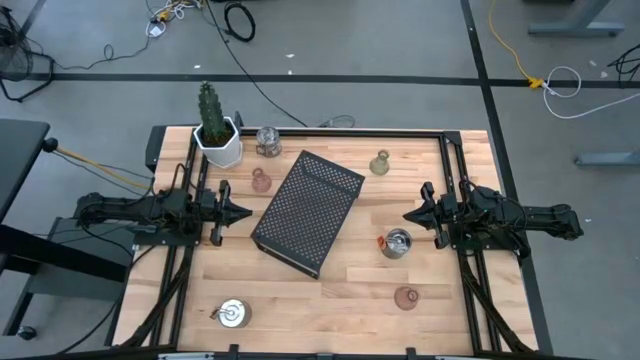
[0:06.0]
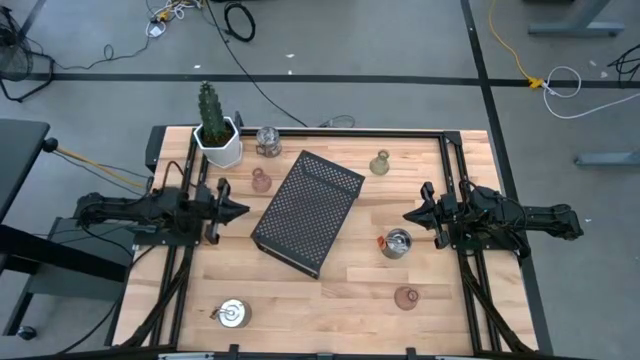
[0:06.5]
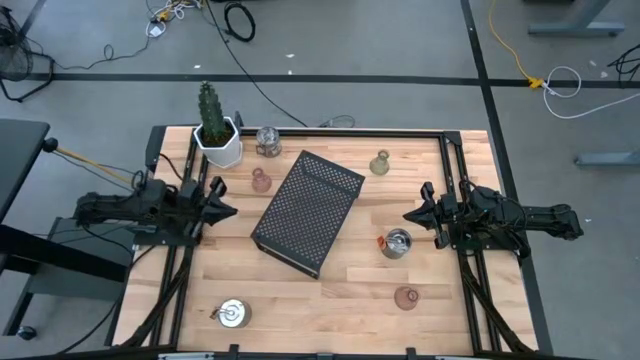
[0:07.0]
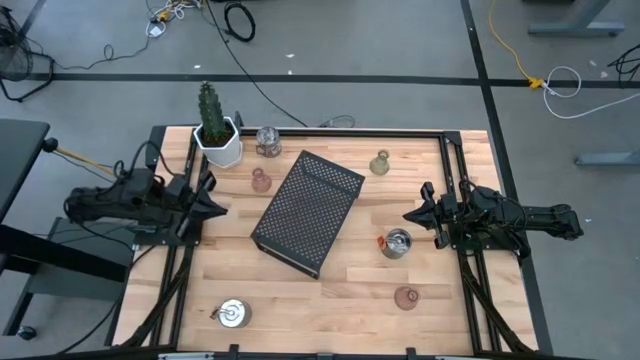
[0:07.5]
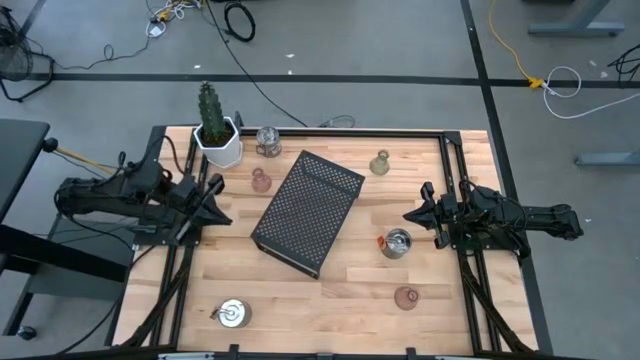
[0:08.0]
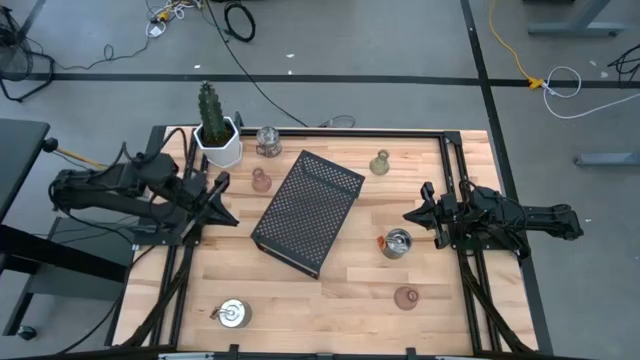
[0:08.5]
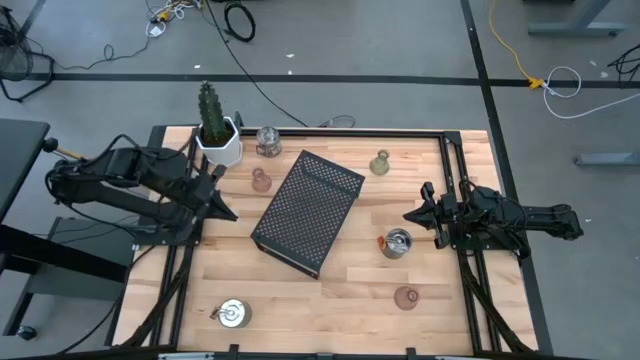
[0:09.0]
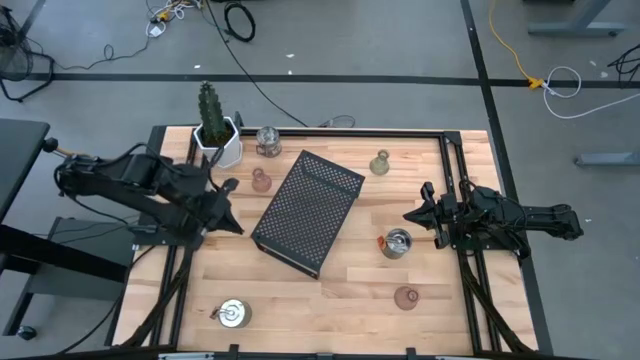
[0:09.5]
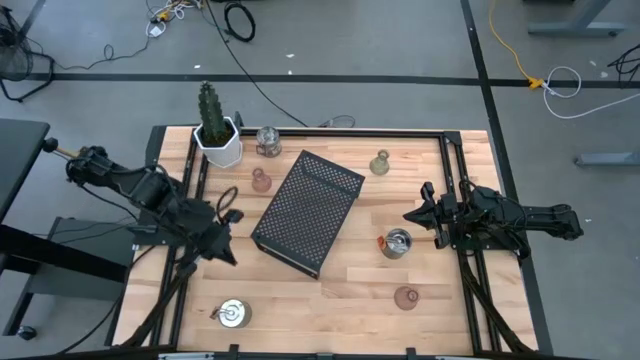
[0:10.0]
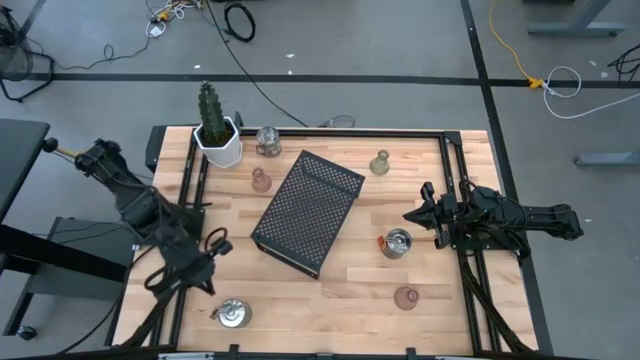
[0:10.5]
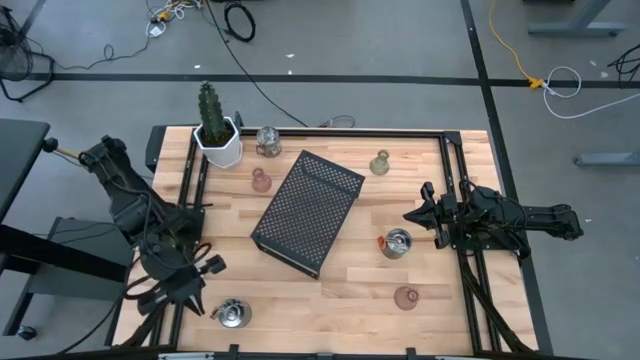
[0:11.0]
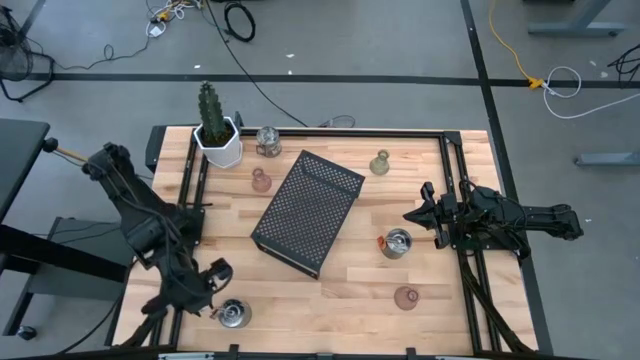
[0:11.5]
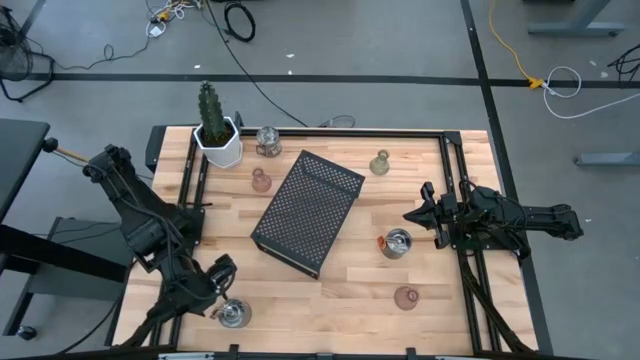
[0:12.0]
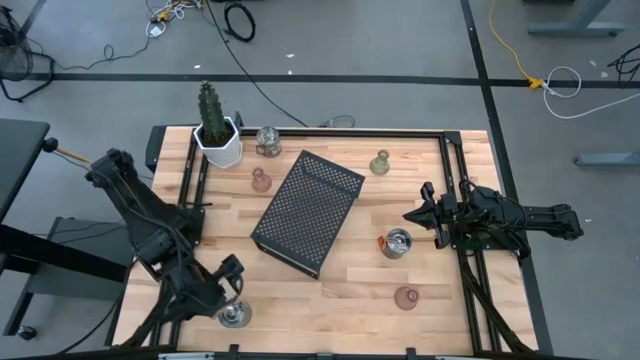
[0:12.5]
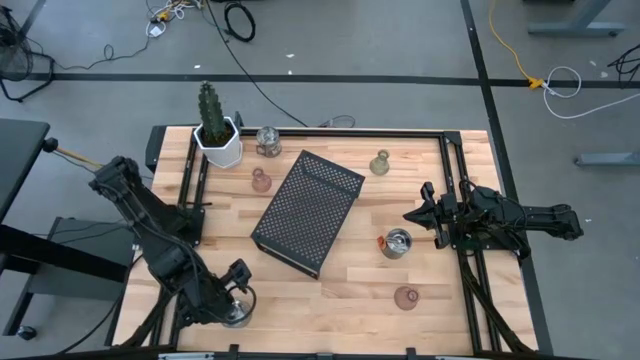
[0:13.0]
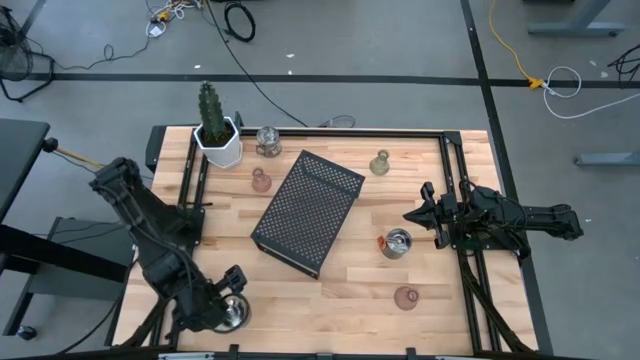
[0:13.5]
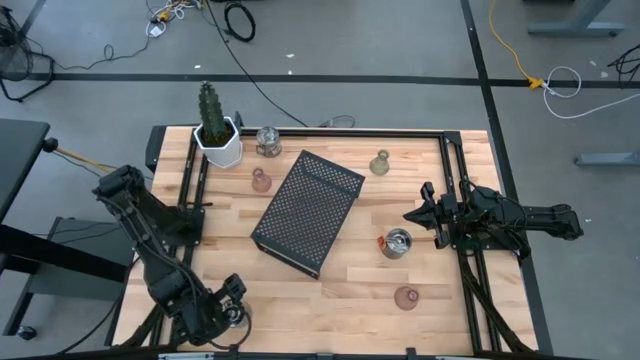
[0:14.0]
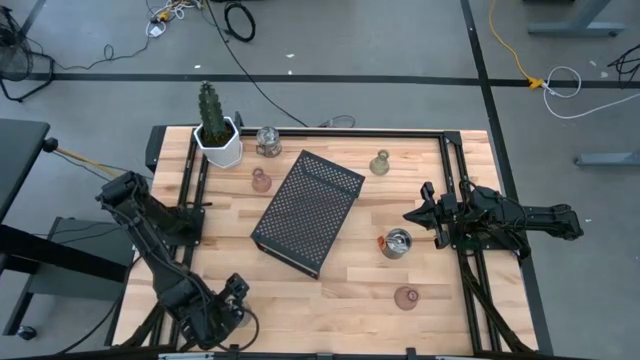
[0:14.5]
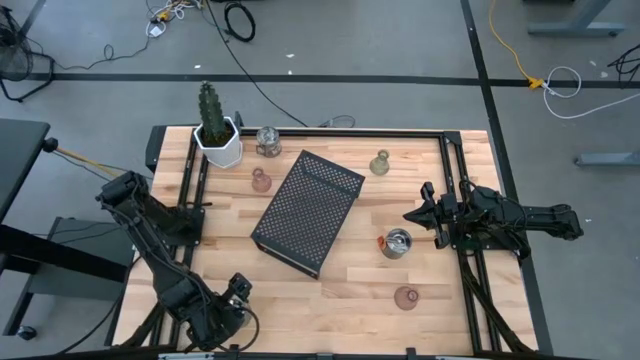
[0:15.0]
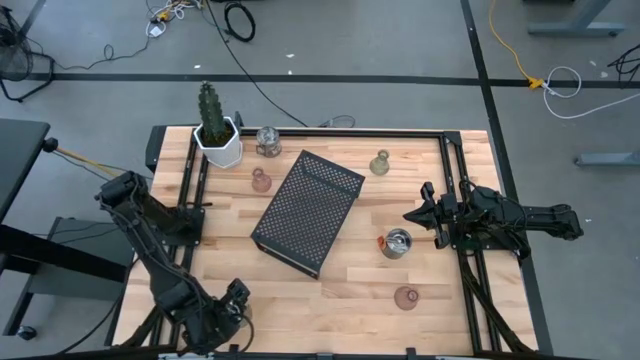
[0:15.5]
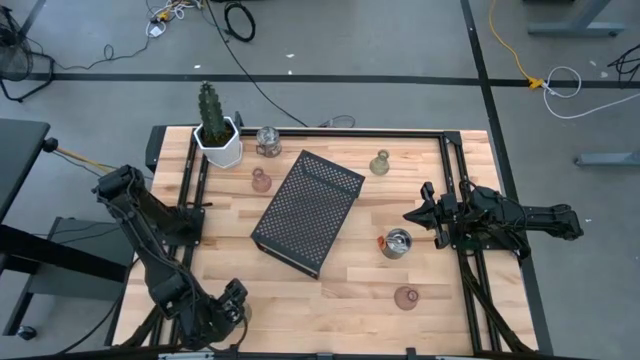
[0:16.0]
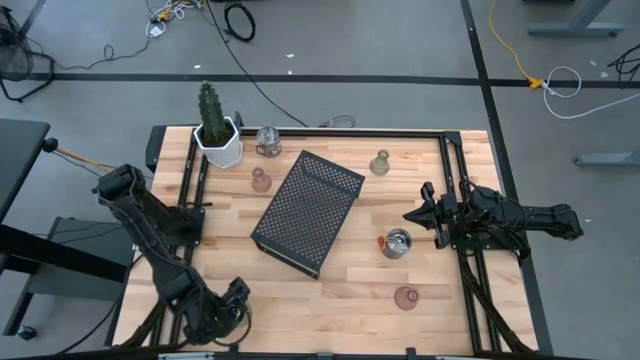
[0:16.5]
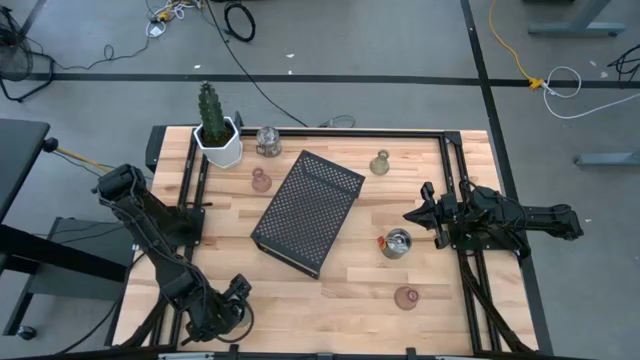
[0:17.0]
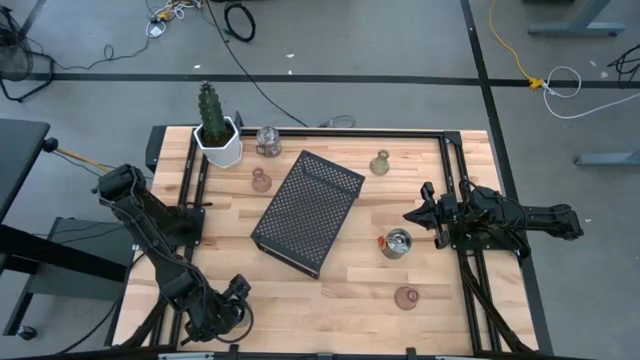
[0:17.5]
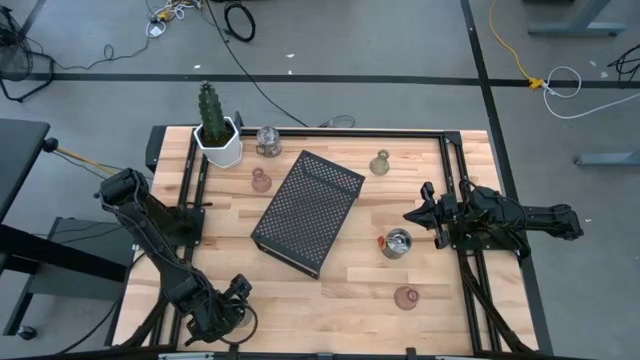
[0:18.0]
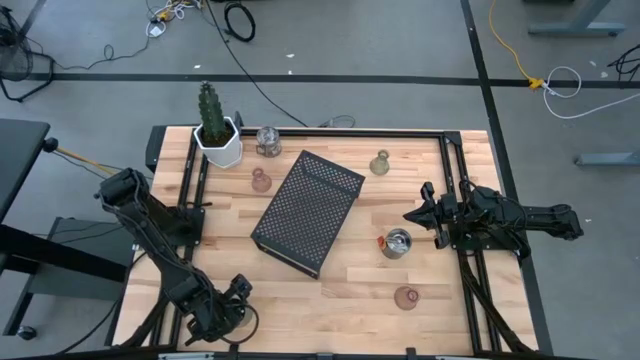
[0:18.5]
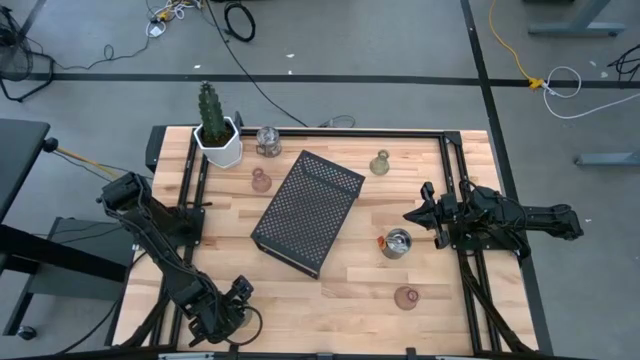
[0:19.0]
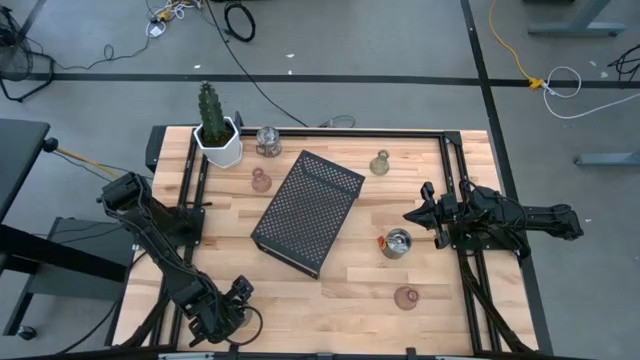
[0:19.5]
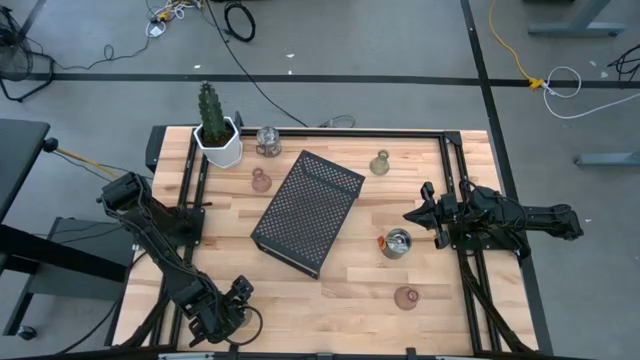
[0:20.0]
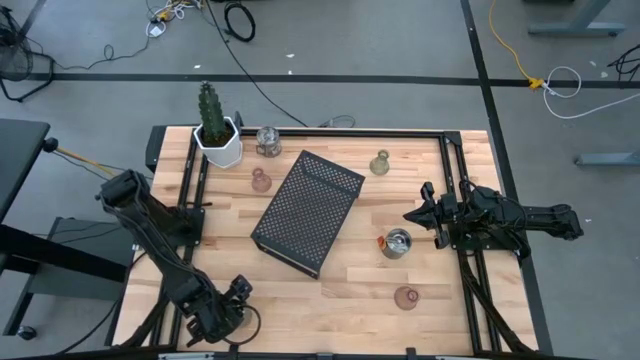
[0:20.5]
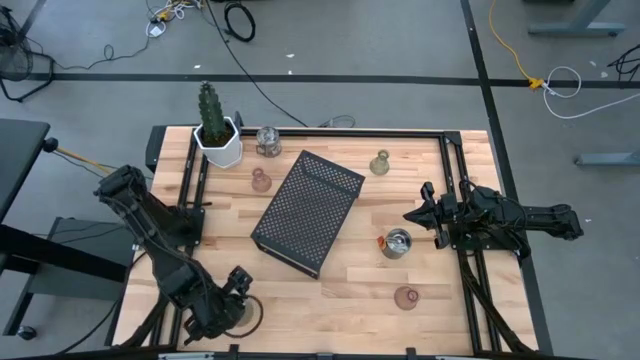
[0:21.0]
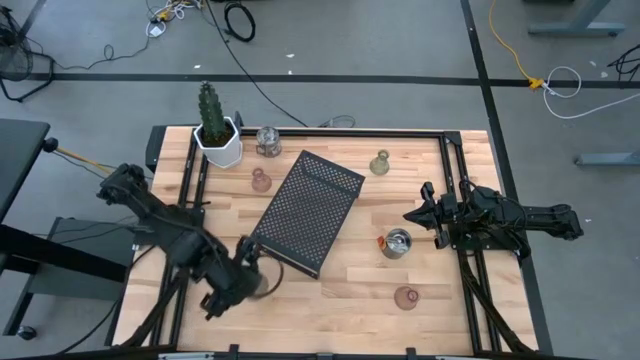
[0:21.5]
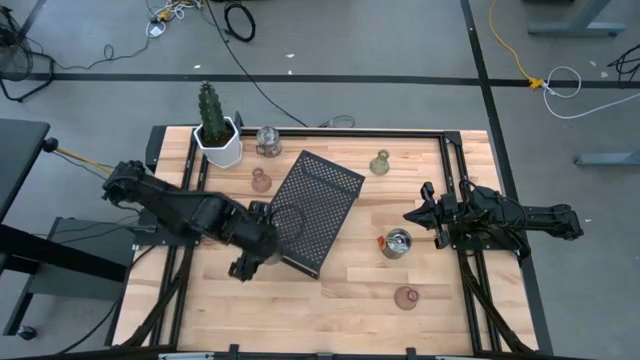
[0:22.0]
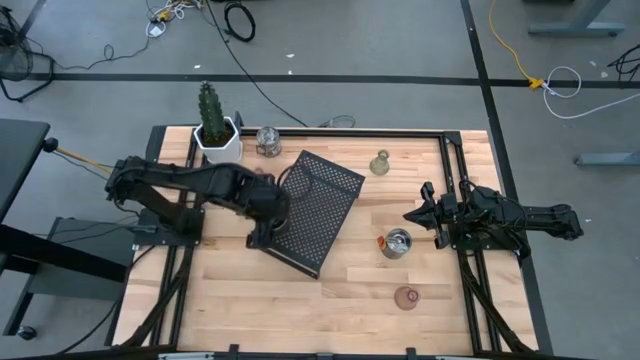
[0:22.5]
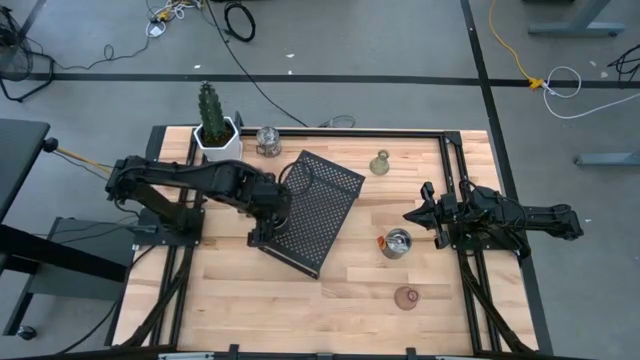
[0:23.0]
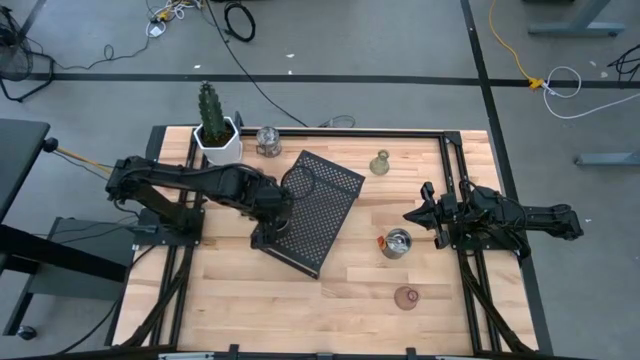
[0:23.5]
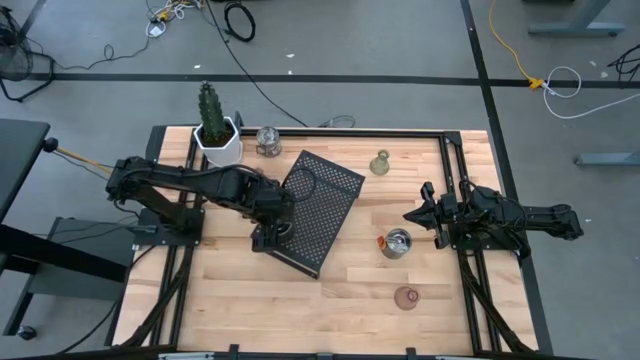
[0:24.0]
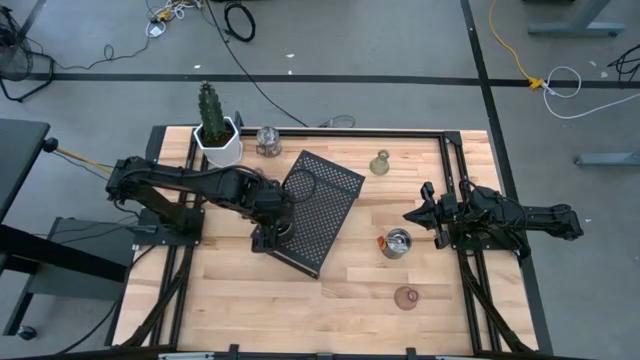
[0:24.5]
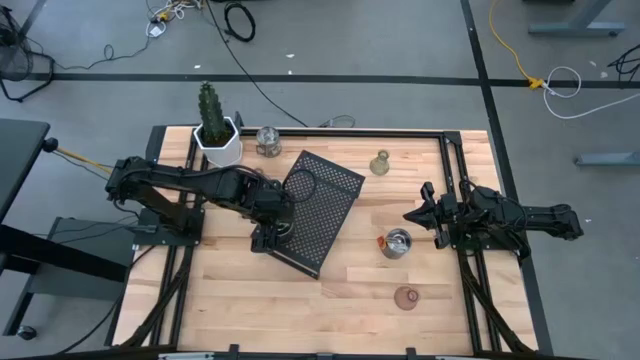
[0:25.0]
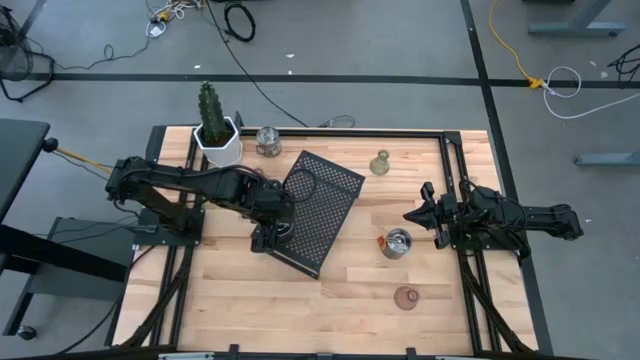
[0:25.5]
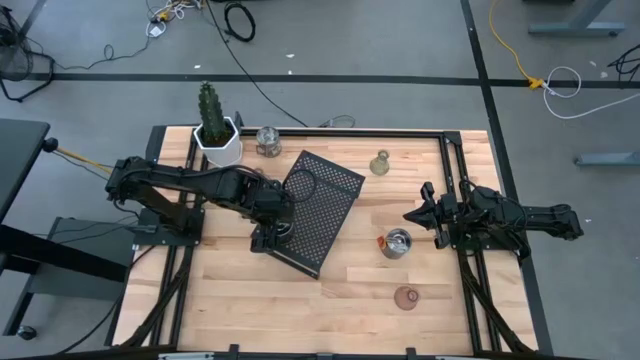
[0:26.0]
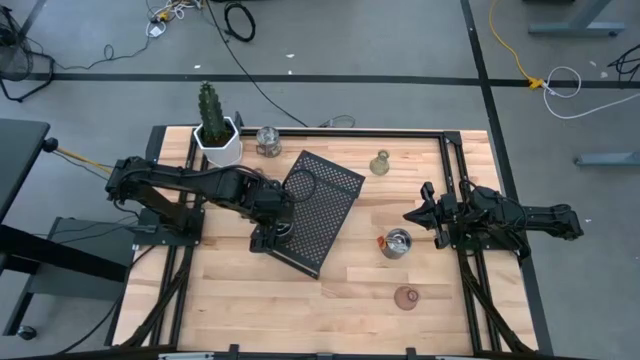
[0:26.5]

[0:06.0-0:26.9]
Task: Pick & Place candle stick holders
Put the bottom left silver scented candle on the shelf
